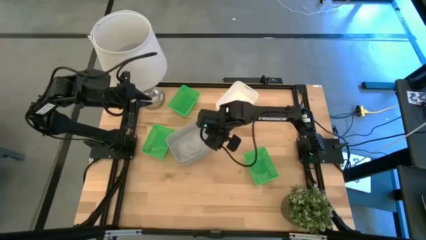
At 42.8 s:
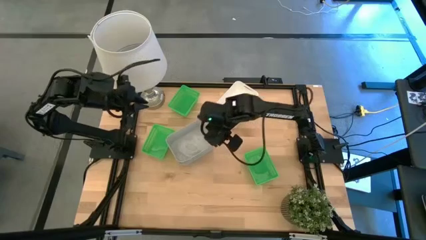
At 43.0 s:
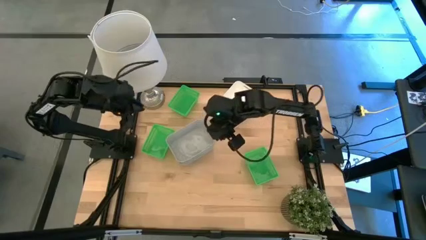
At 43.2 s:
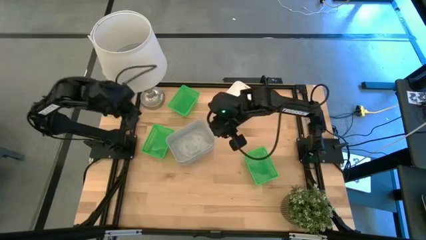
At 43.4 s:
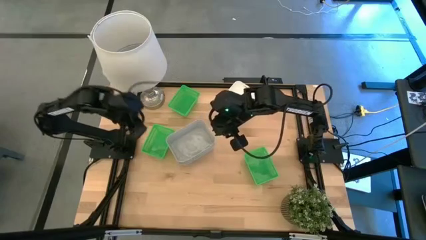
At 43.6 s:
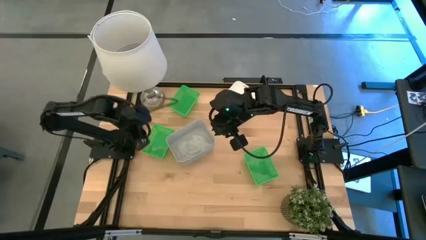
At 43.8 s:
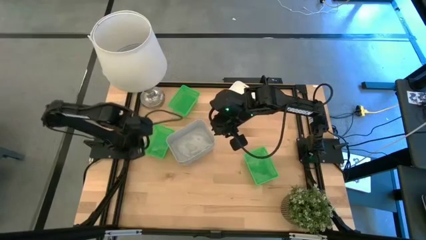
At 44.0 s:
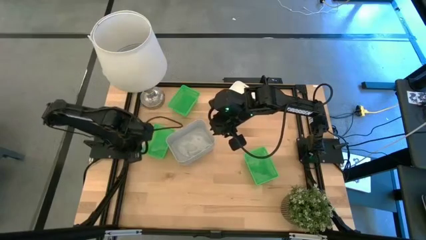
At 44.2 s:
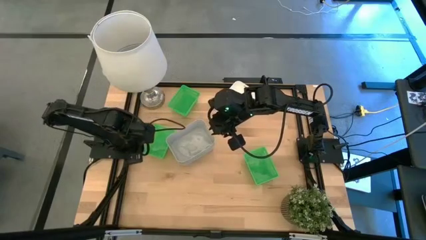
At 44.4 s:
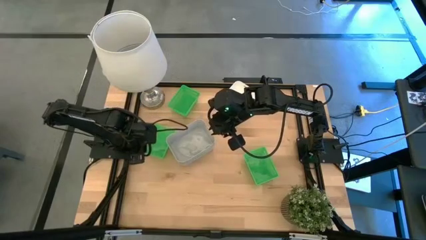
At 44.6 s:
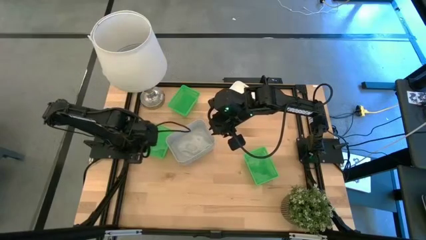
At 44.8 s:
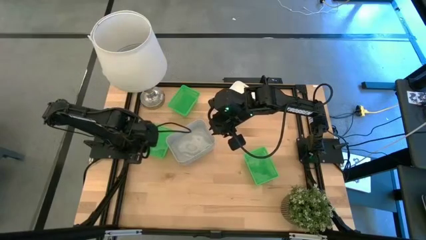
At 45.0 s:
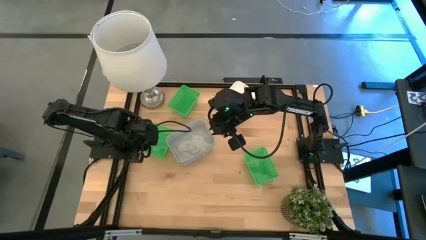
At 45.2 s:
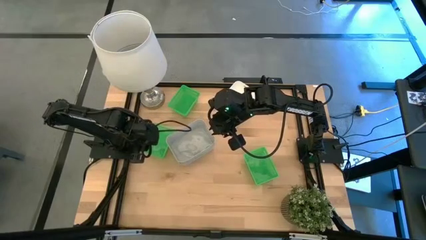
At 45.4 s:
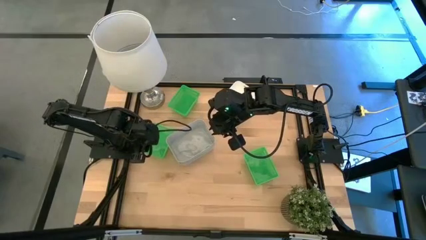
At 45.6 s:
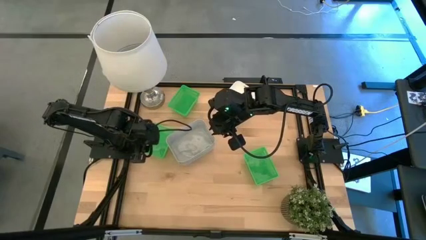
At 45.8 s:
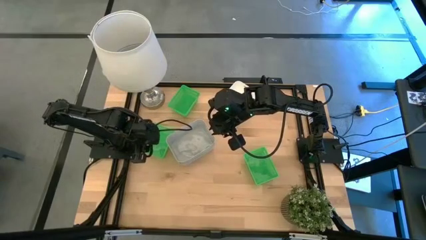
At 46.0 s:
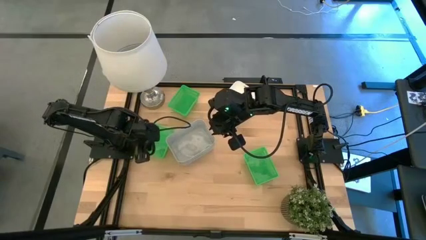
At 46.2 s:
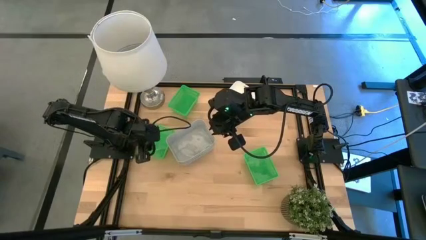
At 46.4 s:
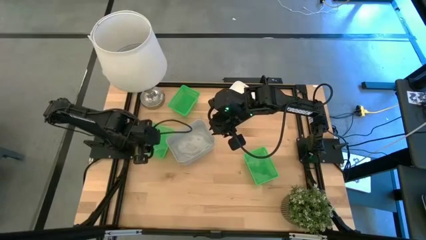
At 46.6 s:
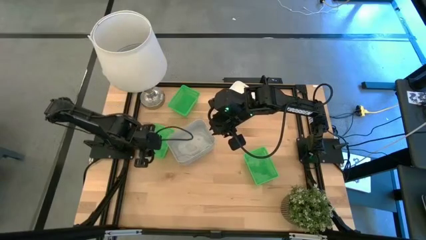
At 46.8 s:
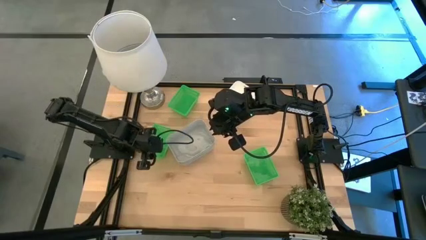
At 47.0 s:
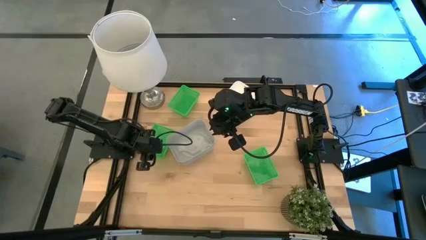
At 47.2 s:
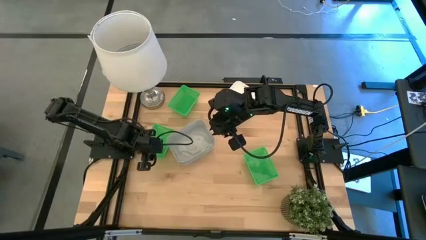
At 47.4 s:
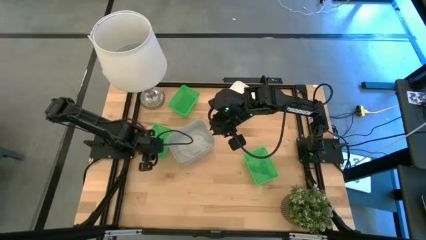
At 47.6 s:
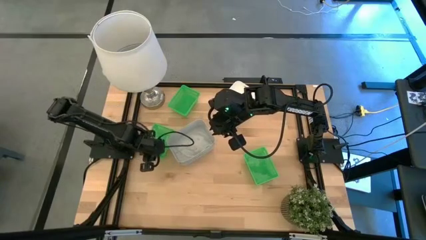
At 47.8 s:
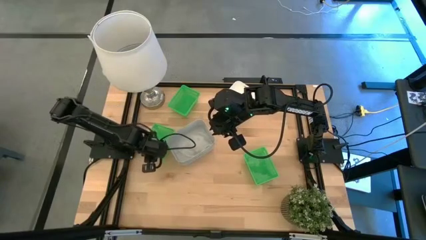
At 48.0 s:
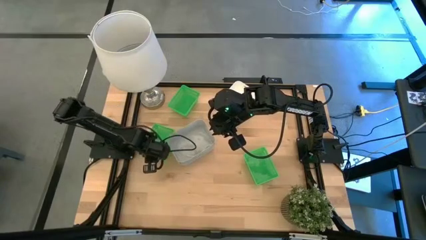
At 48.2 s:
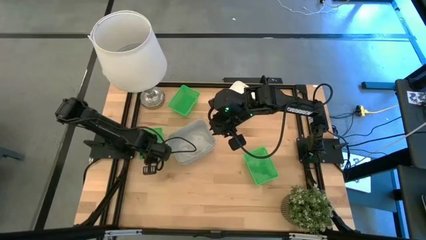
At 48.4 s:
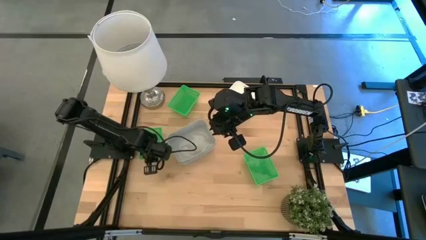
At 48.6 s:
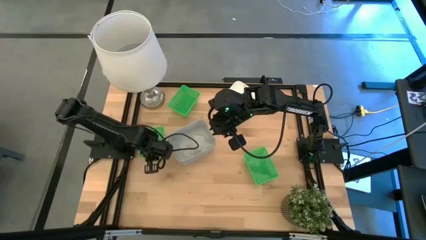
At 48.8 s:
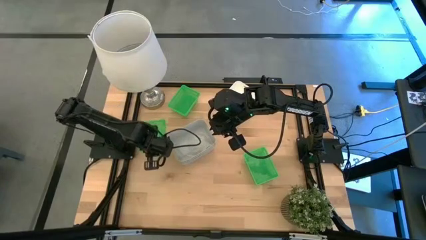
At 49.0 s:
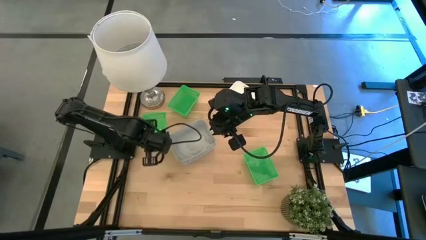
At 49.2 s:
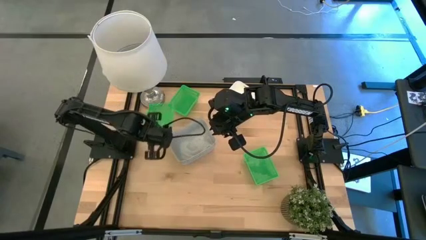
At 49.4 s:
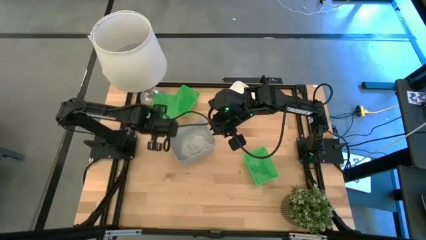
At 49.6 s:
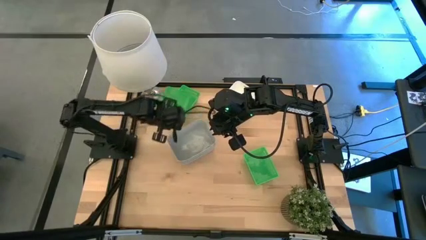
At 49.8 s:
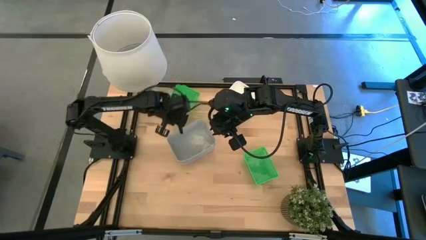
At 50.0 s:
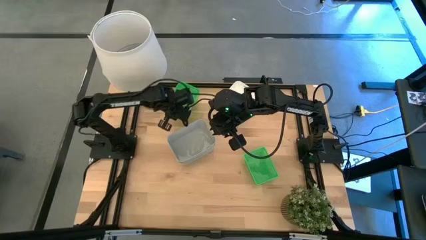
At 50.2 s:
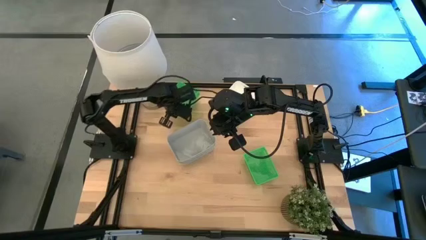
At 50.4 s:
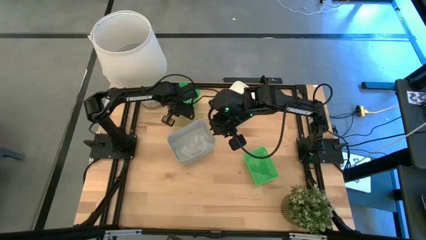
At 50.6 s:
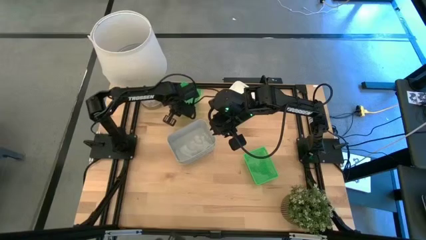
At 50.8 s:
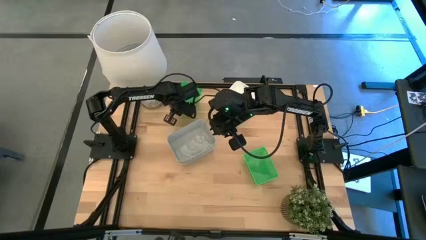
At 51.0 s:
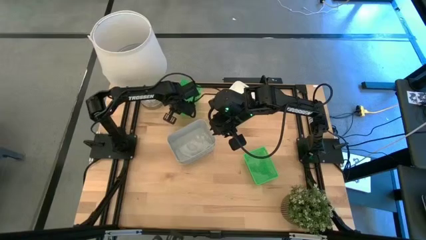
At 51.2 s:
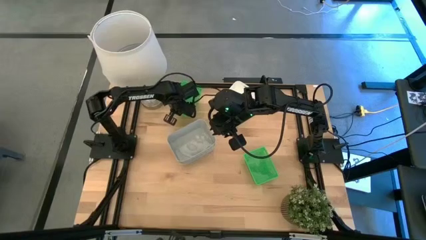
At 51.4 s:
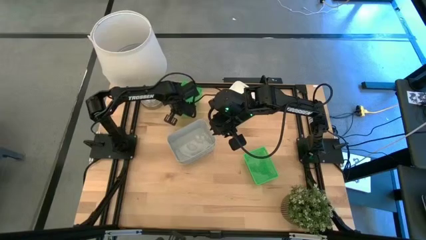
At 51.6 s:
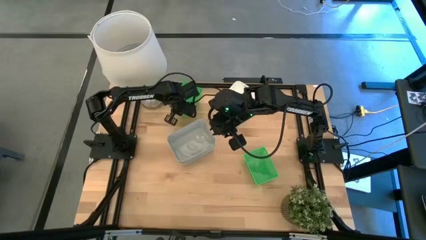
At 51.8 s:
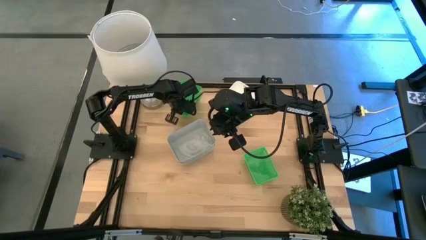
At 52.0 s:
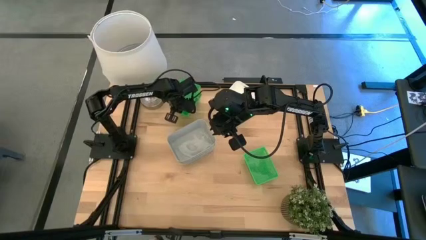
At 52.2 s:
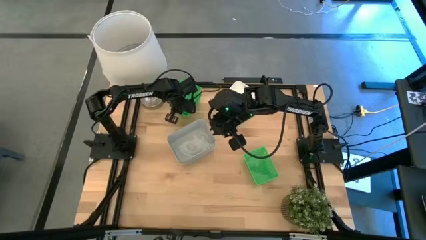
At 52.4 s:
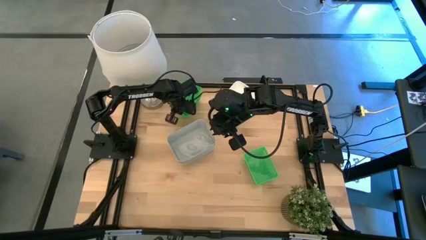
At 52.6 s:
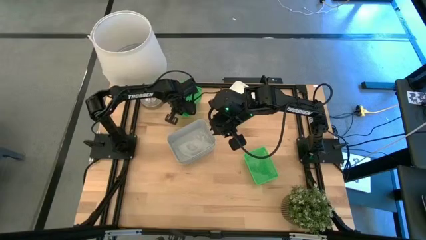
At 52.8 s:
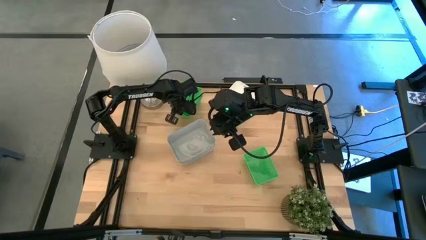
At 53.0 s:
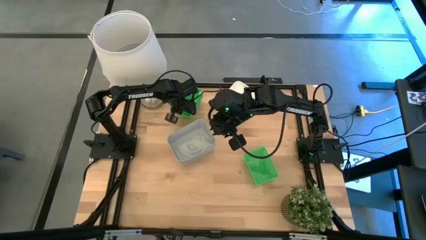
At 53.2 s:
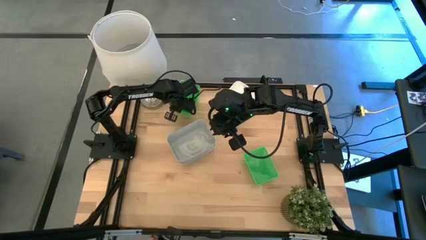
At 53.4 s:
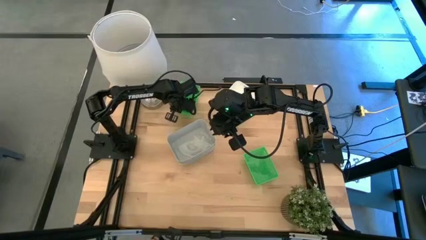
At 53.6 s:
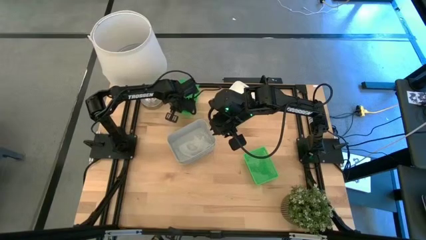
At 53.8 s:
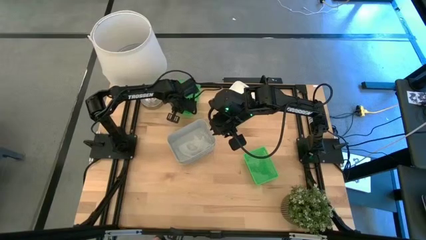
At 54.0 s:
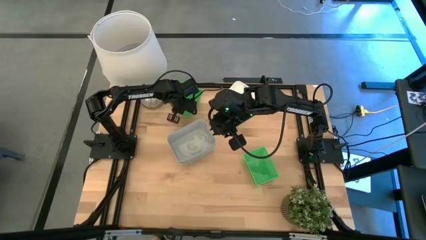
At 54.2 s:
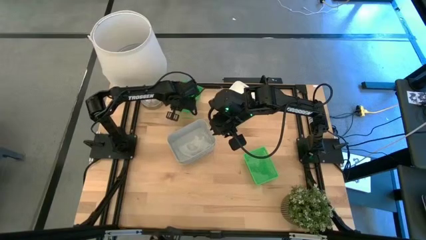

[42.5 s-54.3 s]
Stack the middle green bin on the top green bin
